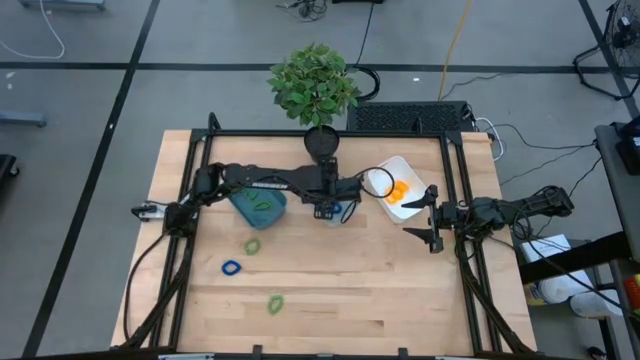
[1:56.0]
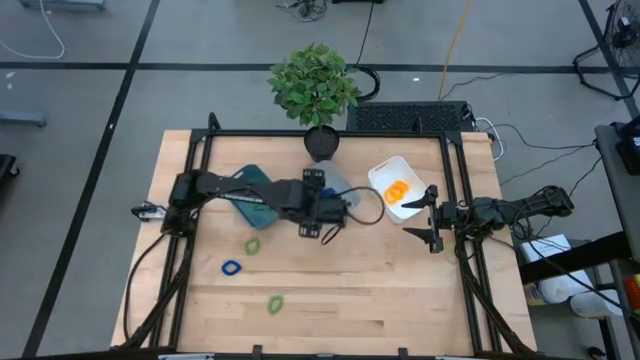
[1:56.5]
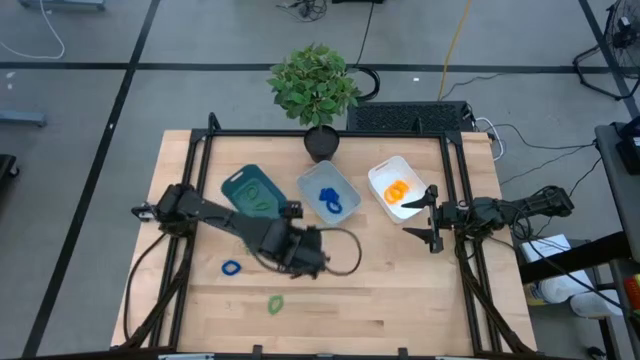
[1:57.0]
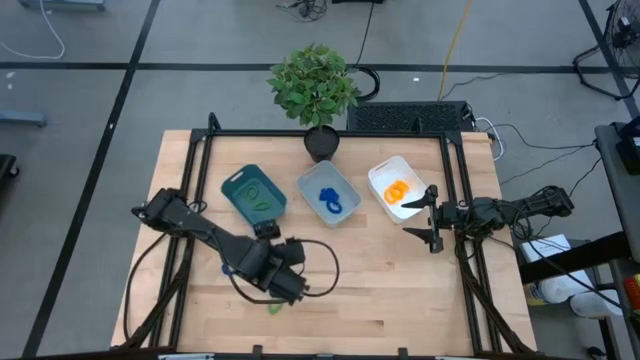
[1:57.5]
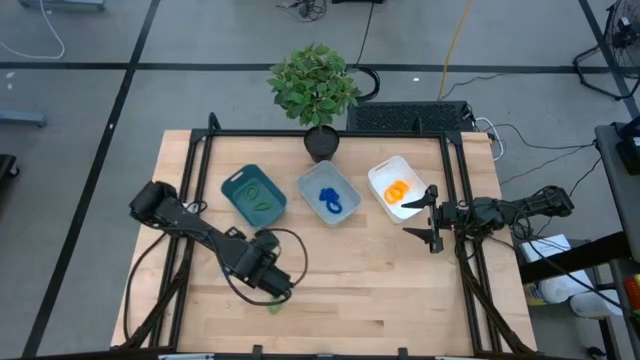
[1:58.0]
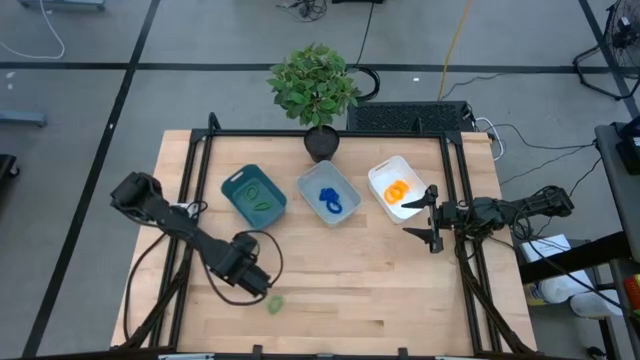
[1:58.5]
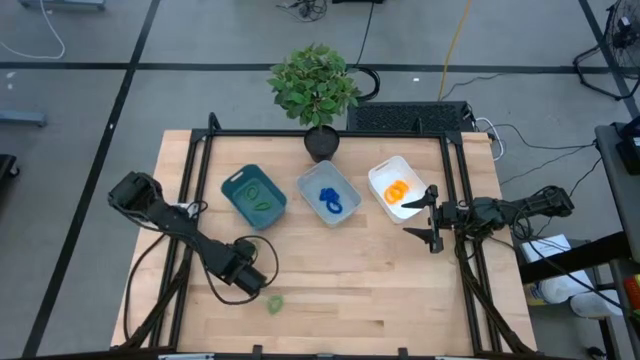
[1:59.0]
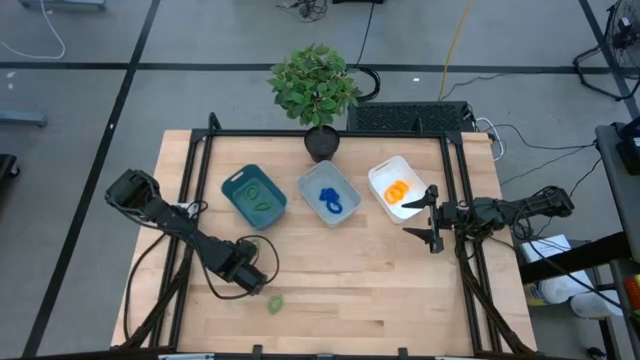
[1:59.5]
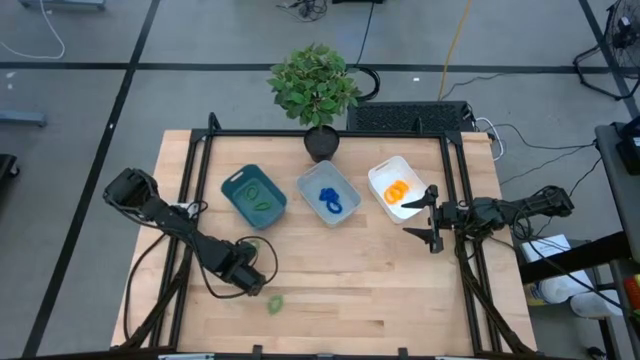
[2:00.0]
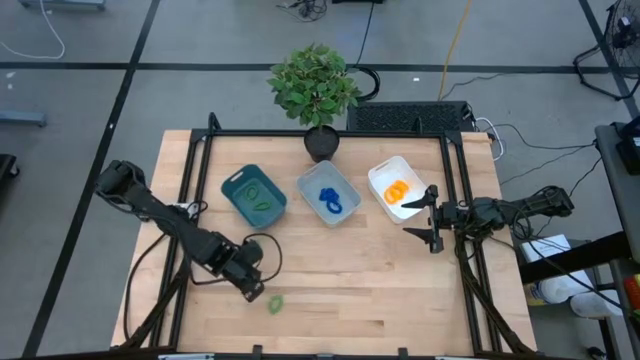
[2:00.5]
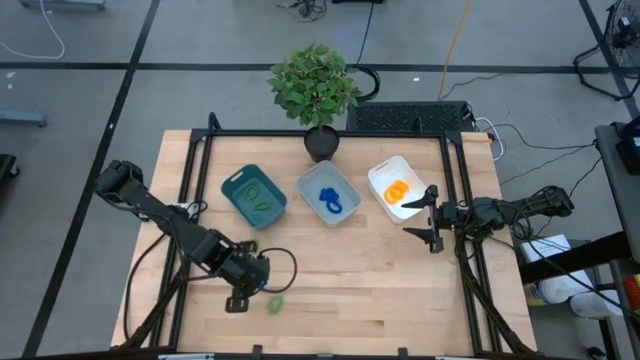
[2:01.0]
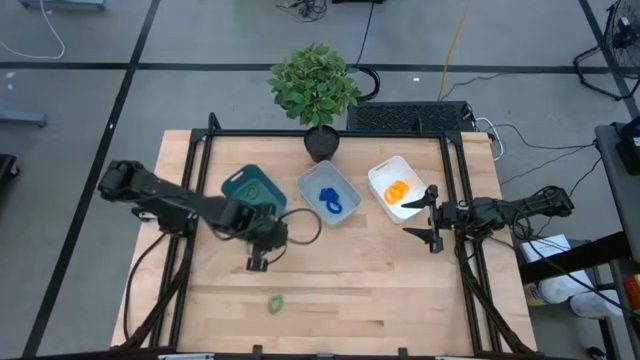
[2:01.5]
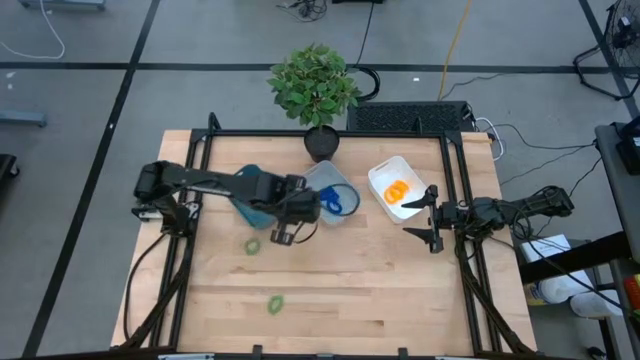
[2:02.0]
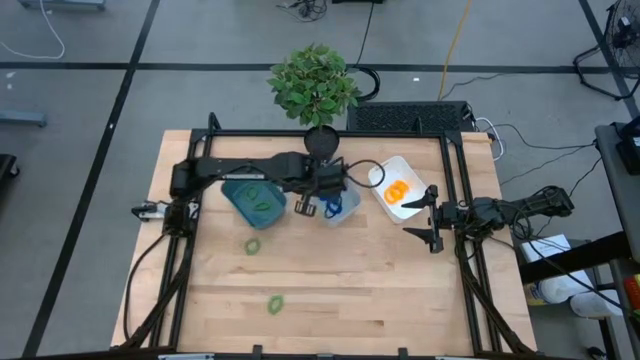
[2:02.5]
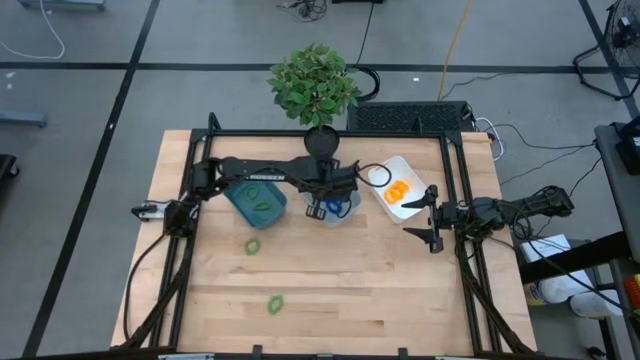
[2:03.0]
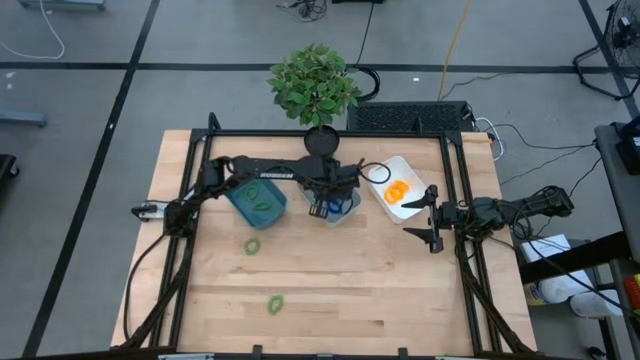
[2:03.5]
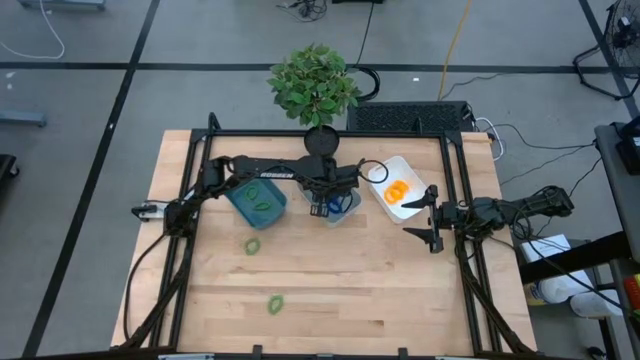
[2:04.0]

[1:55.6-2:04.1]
Task: Sort spring keychains
Put the blue spring keychain into the gray bin

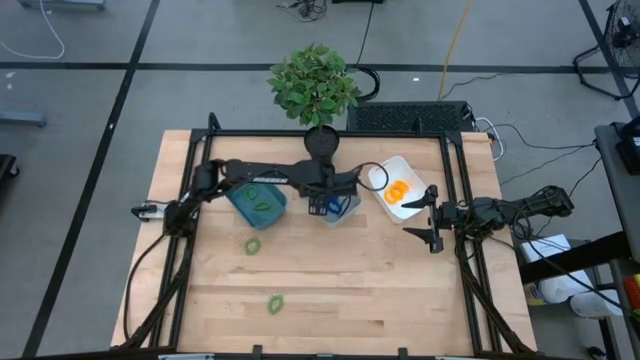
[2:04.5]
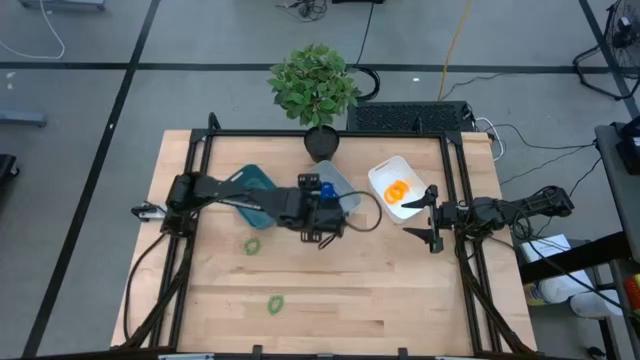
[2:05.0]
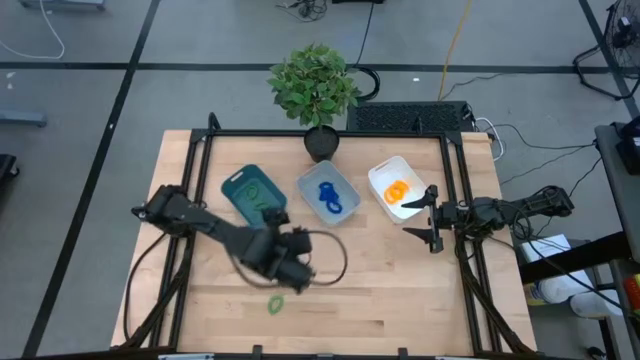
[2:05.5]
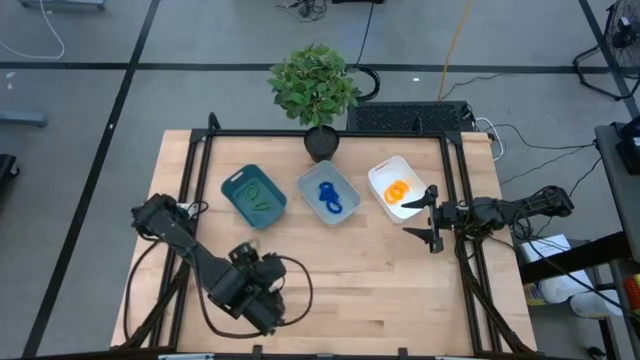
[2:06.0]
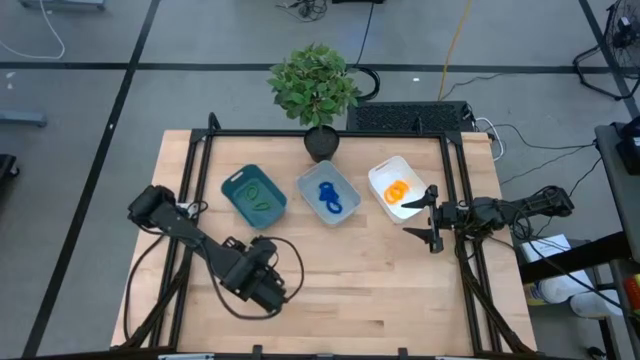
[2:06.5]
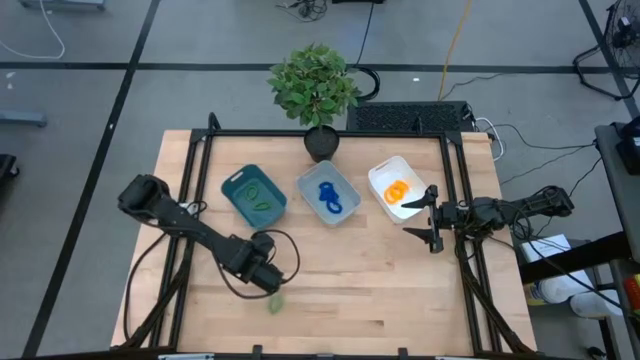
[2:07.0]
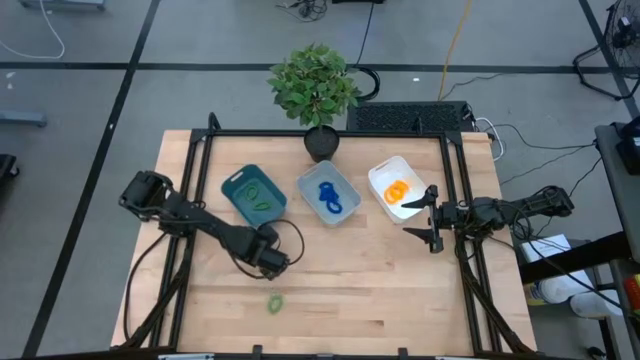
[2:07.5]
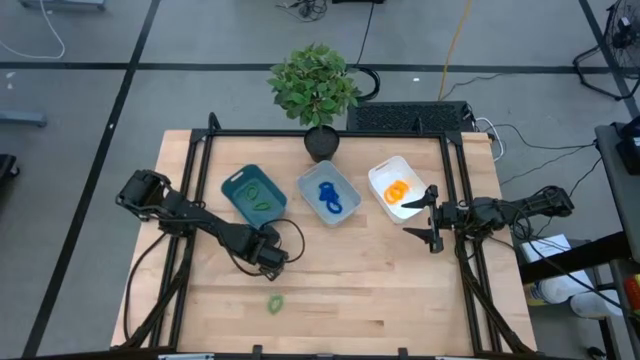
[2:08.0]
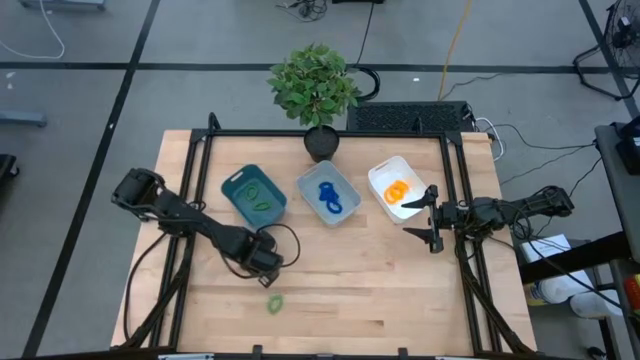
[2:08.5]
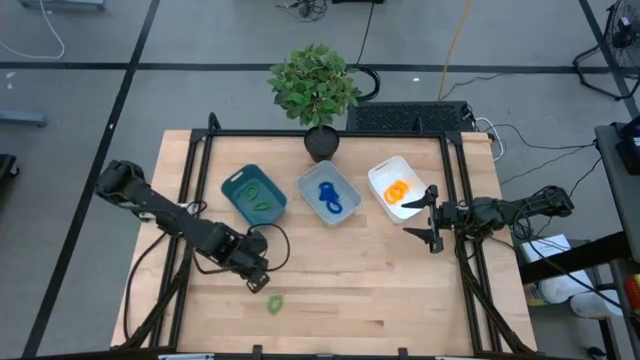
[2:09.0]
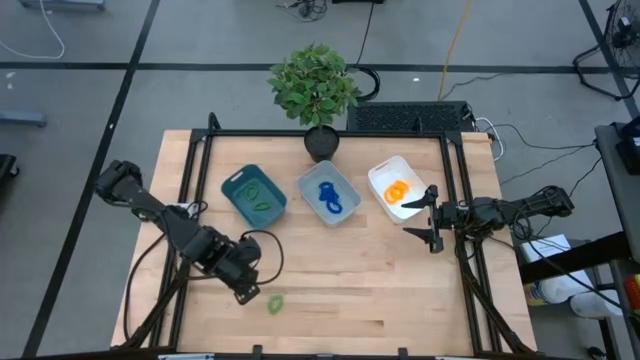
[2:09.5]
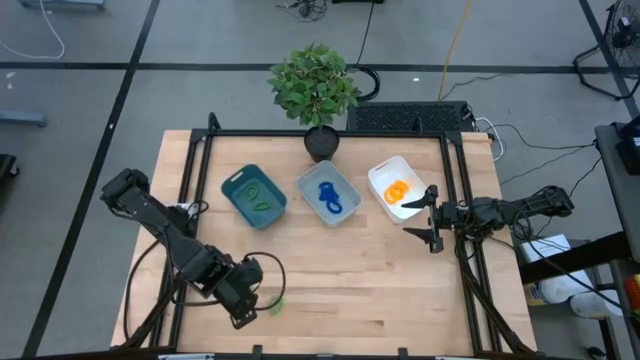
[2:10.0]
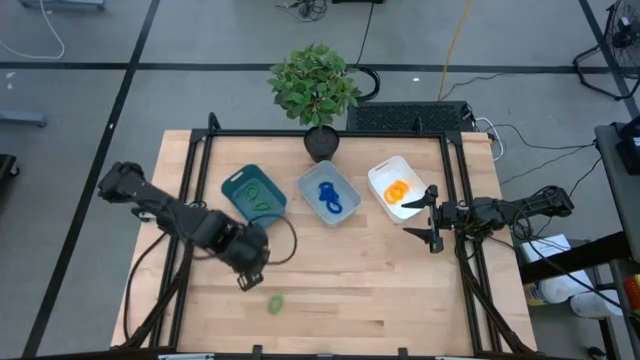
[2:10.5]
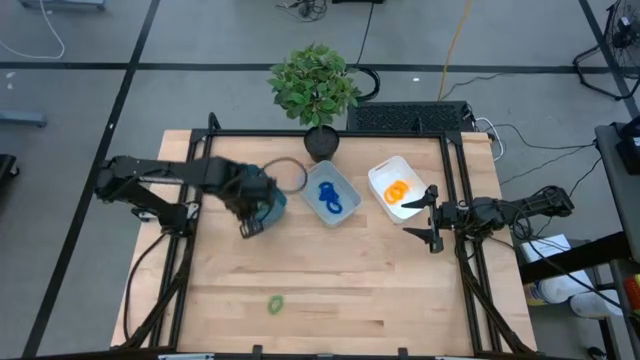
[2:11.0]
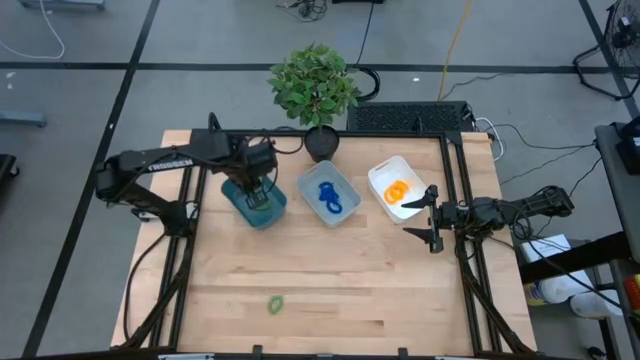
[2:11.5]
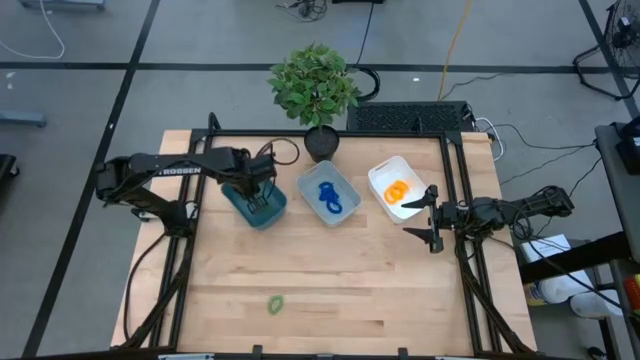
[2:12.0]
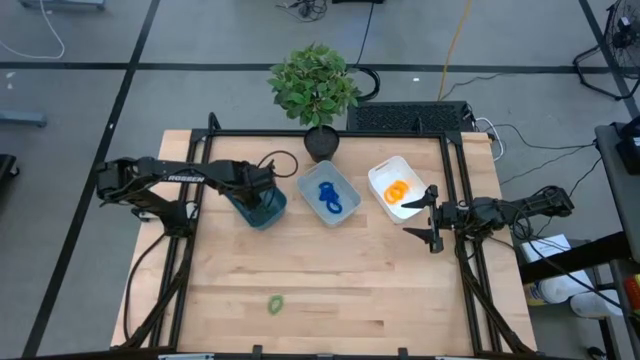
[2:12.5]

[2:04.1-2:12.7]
Put the top green spring keychain into the blue bin

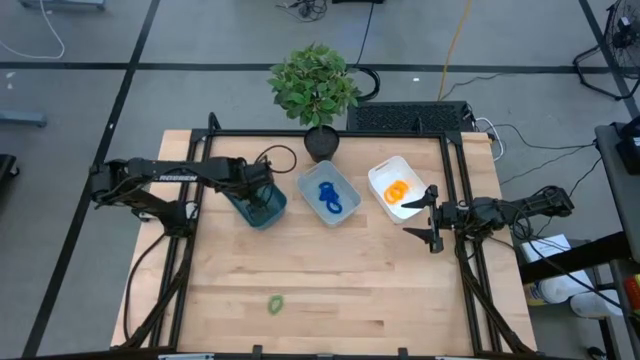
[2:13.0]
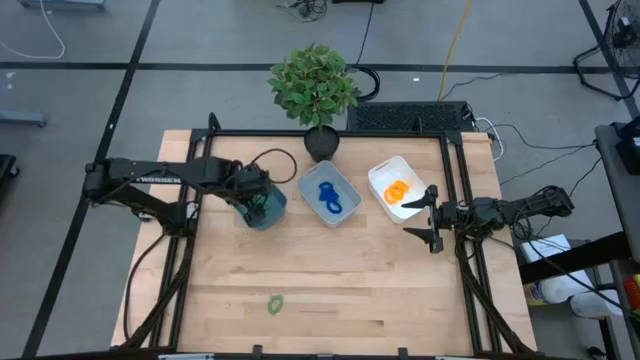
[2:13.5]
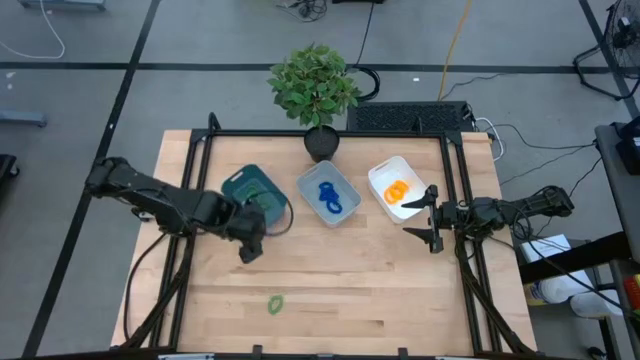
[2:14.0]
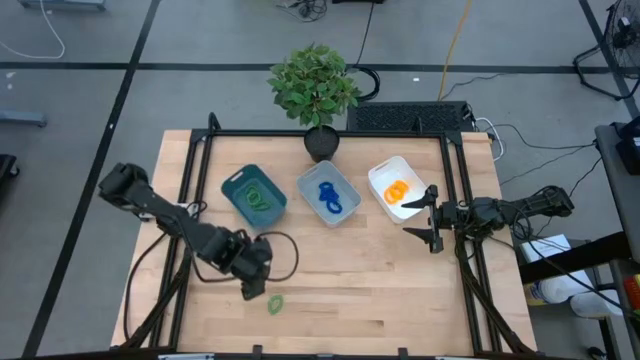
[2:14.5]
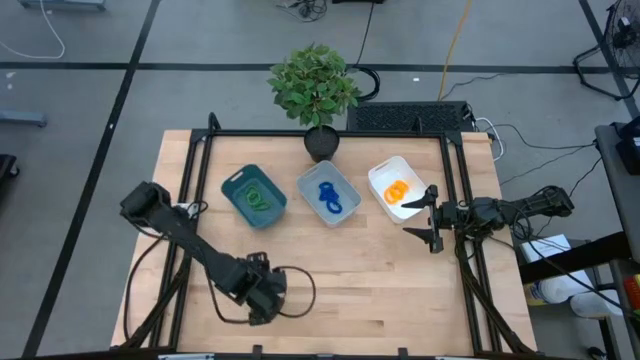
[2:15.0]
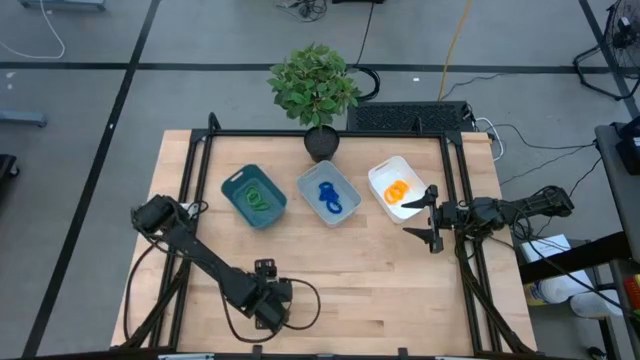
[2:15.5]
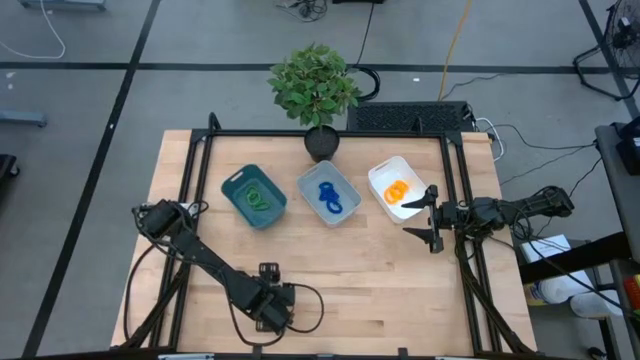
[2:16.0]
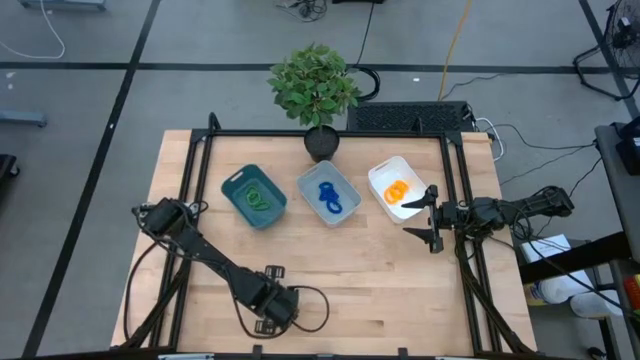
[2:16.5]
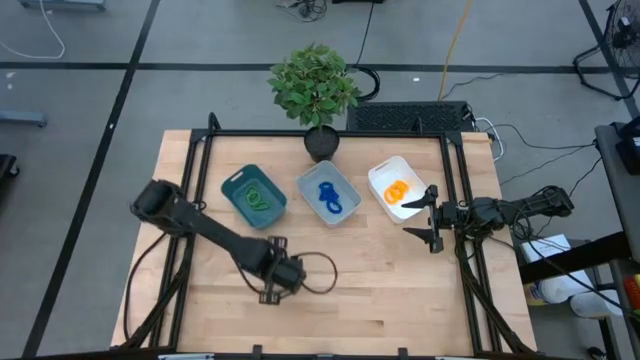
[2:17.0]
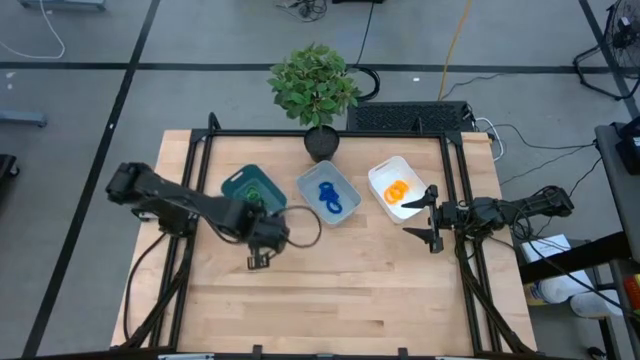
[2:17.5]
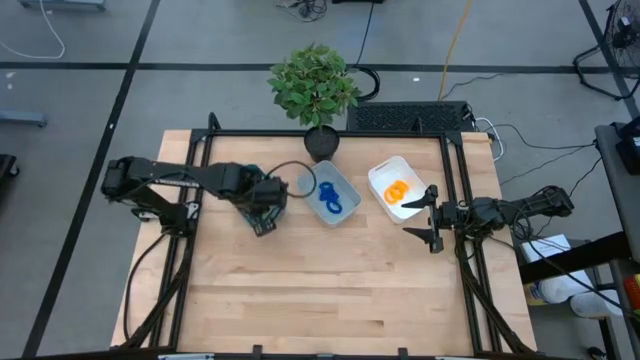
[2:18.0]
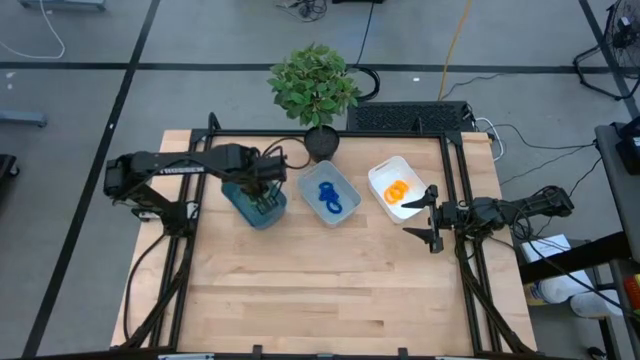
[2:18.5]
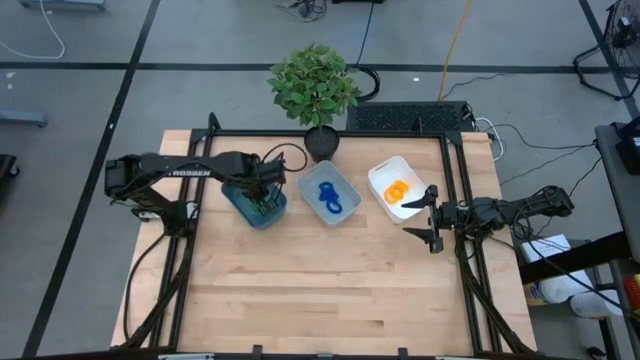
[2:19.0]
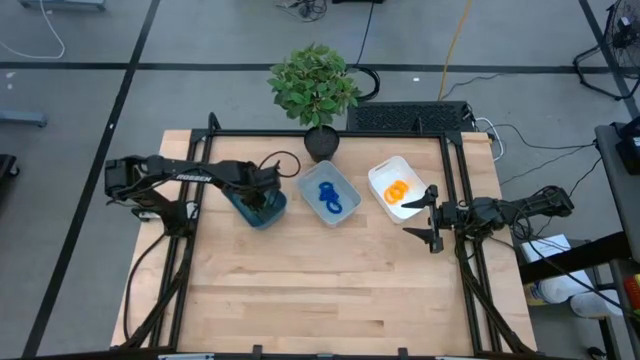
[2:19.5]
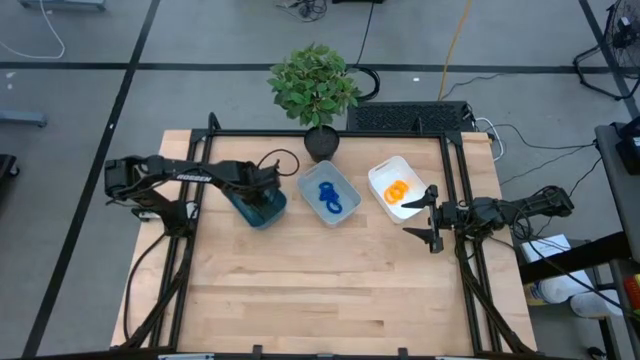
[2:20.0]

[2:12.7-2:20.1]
Put the green spring keychain into the blue bin
